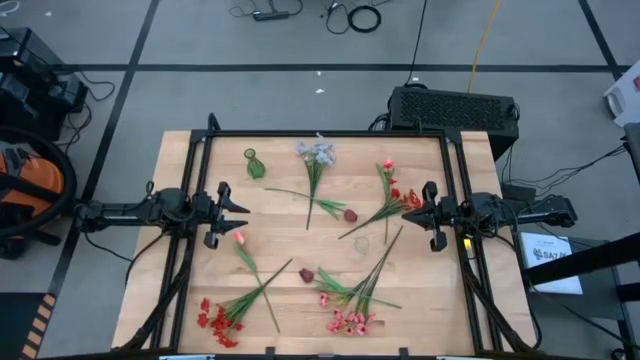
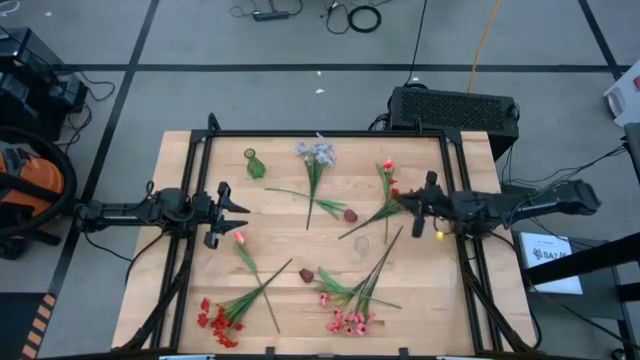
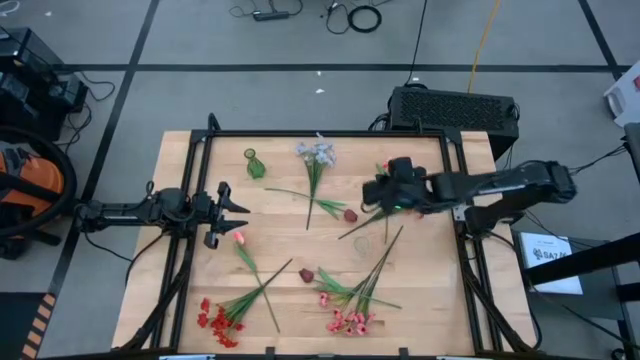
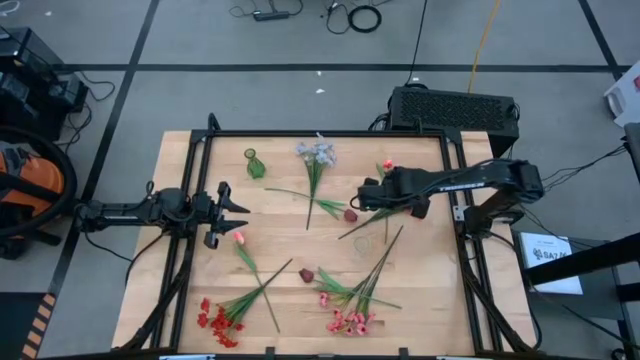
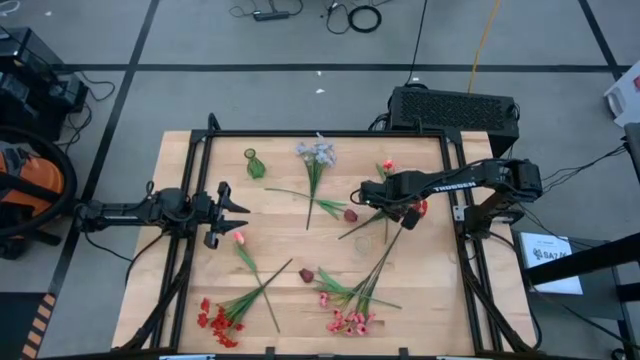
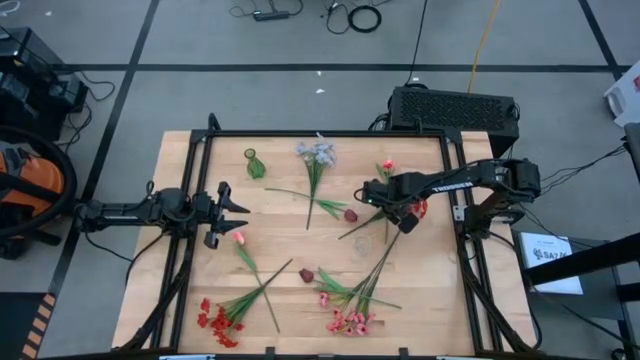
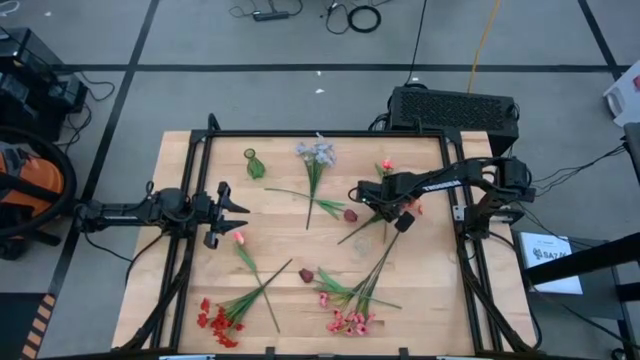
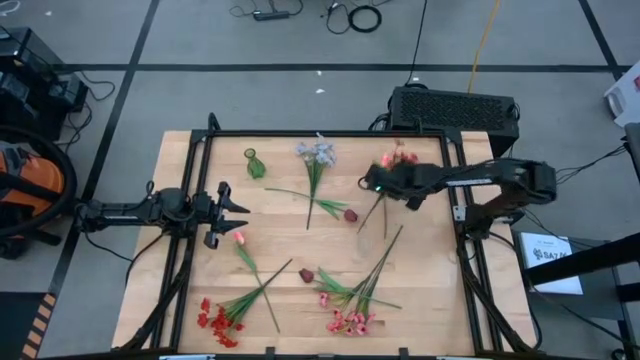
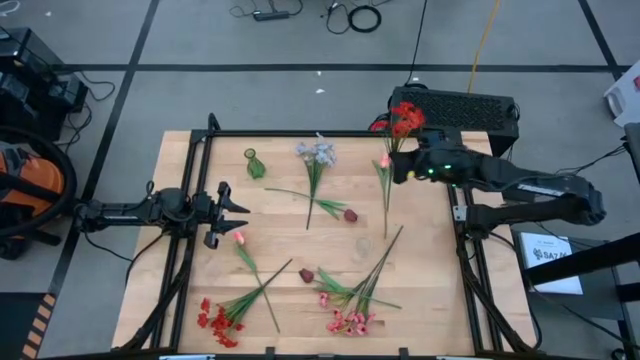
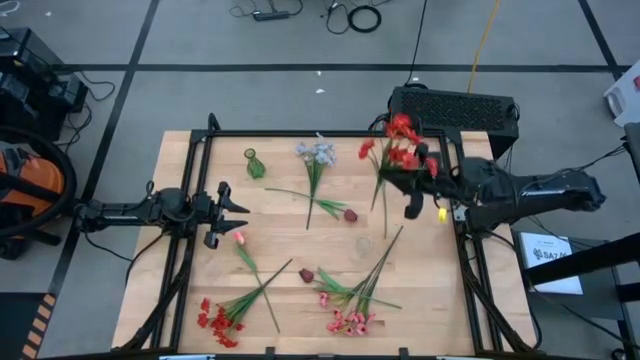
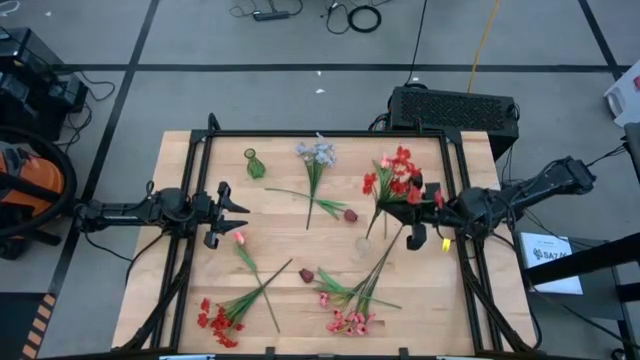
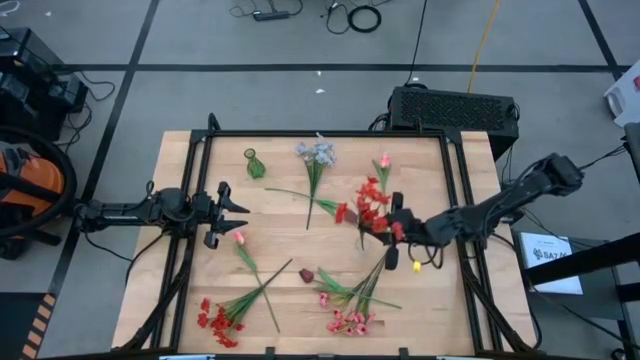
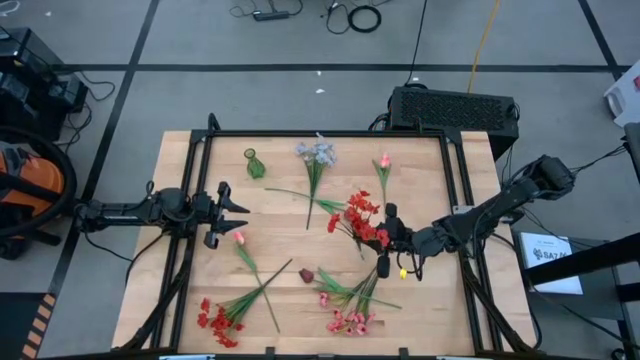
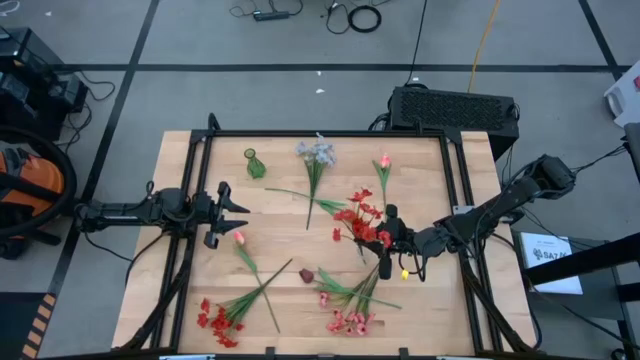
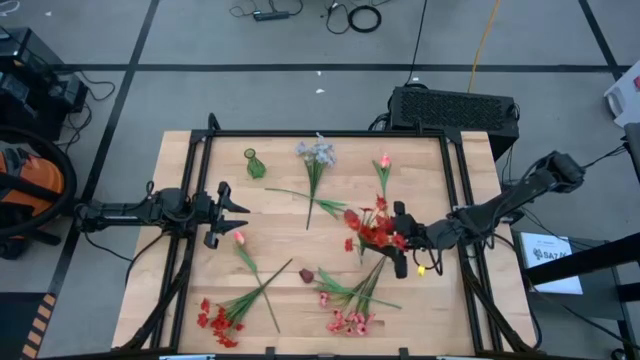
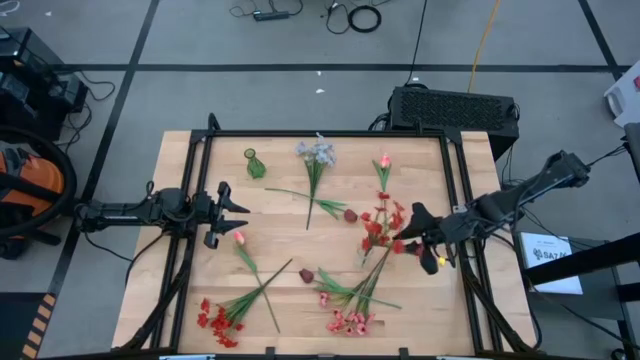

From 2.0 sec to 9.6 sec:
Task: Sort flowers into vase by color
Put the top orange flower into the transparent vase

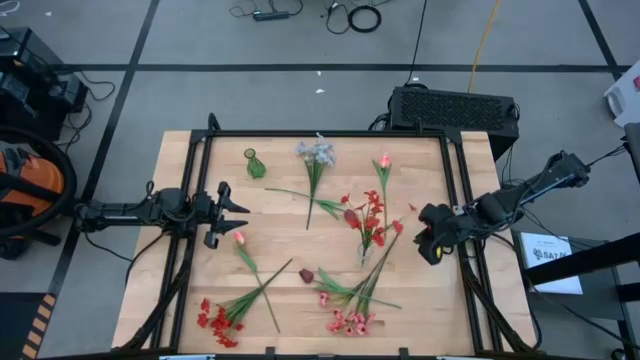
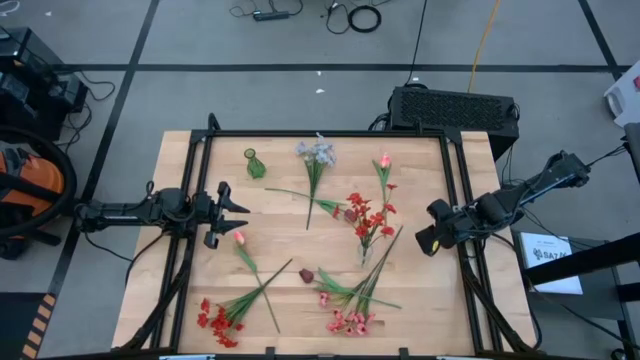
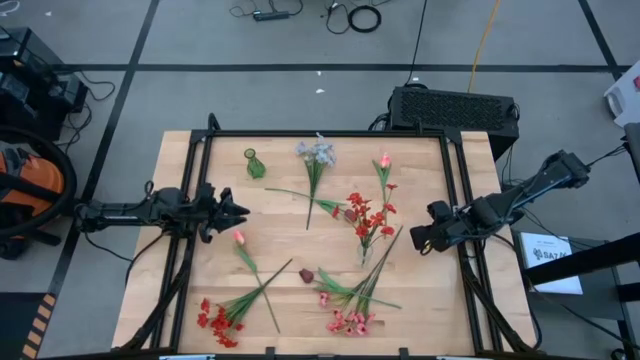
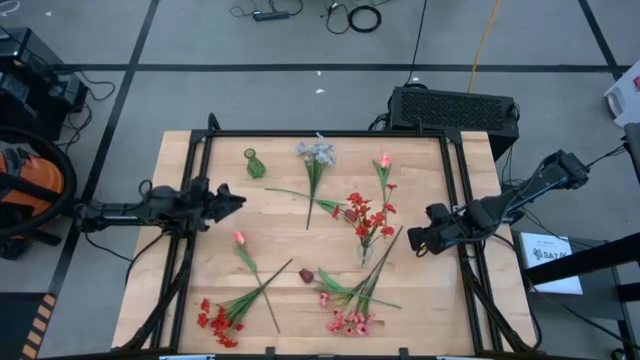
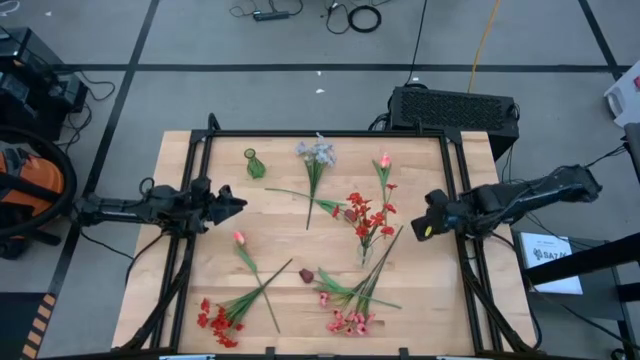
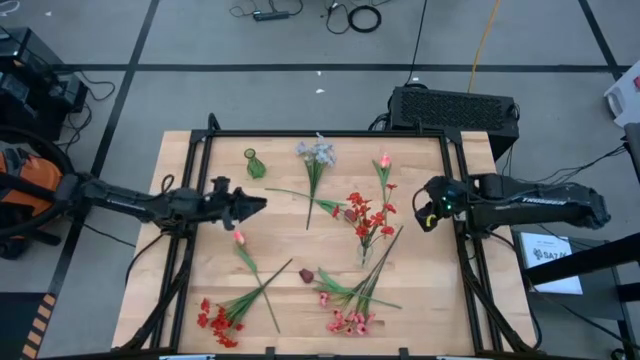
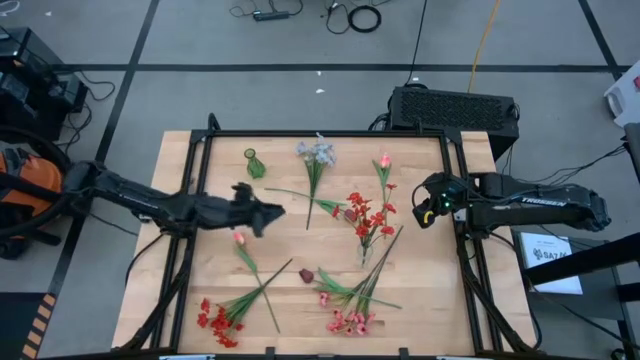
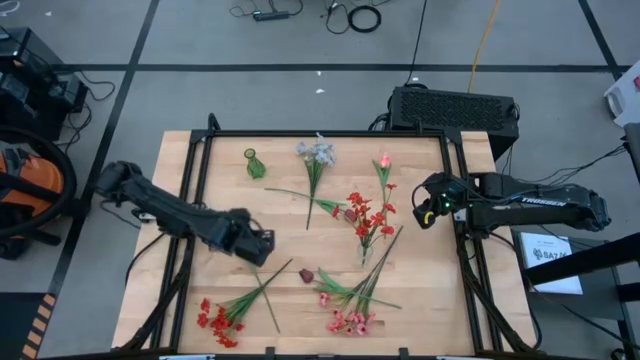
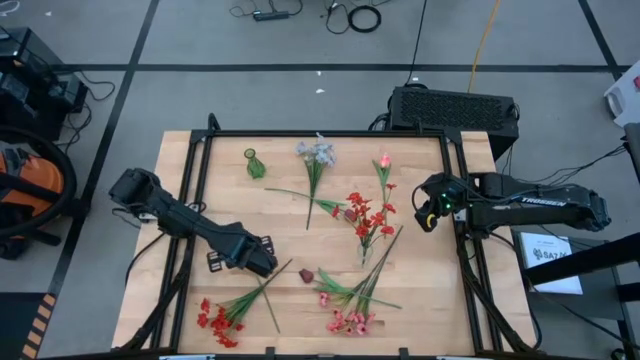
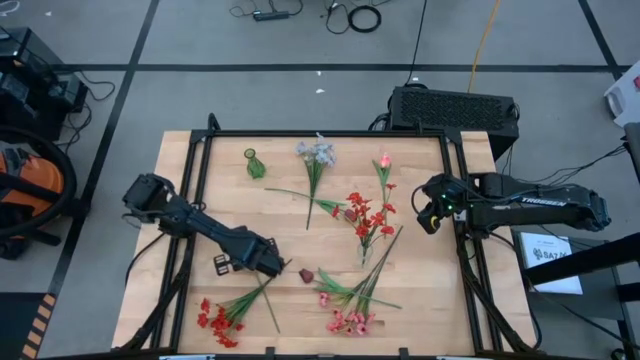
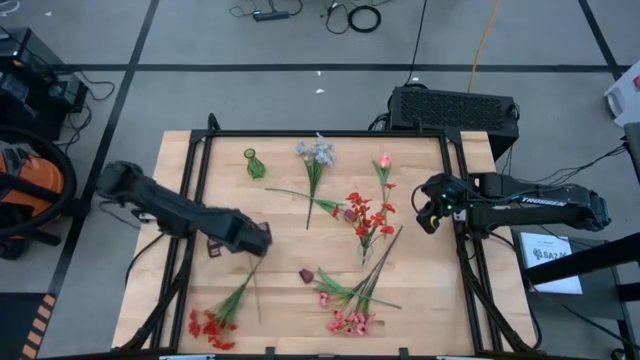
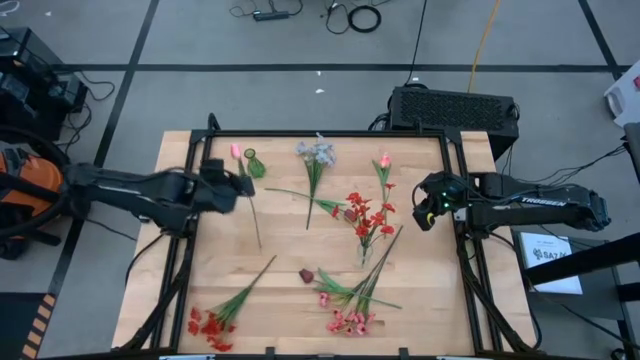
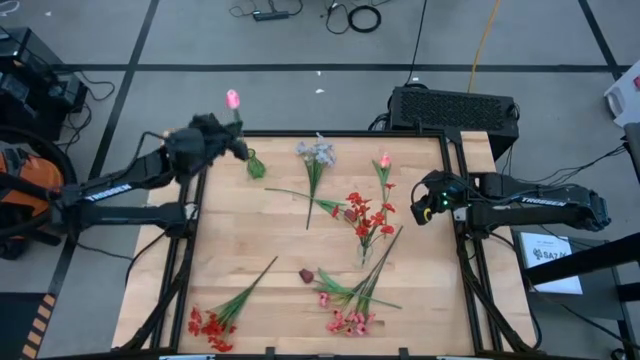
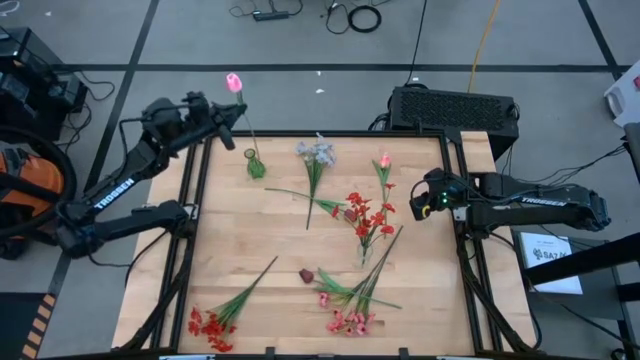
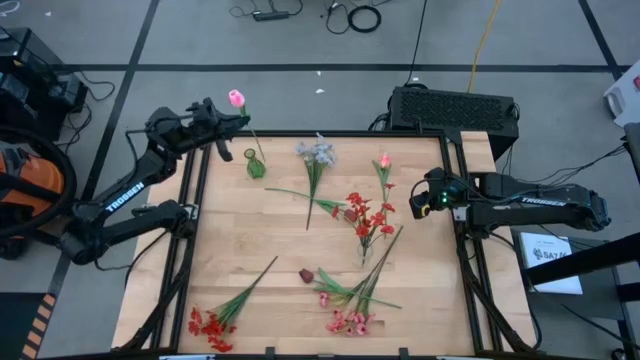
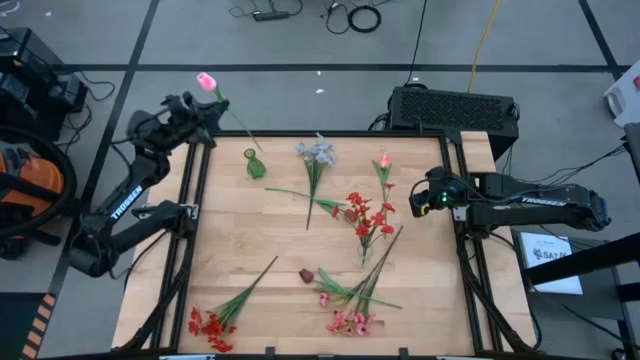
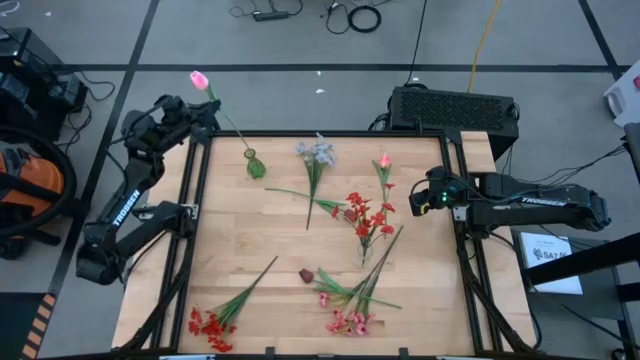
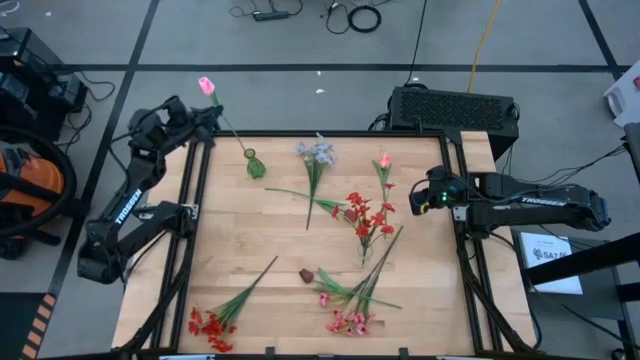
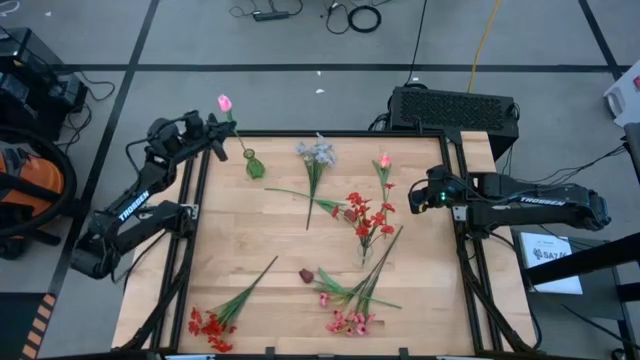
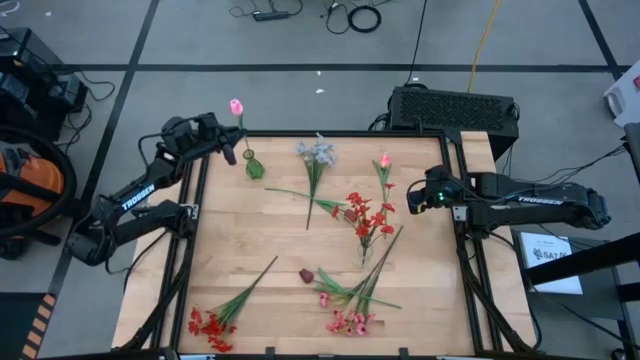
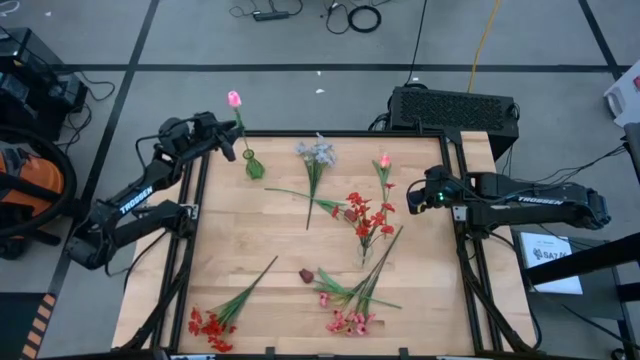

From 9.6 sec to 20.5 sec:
Put the bottom pink flower into the green vase
